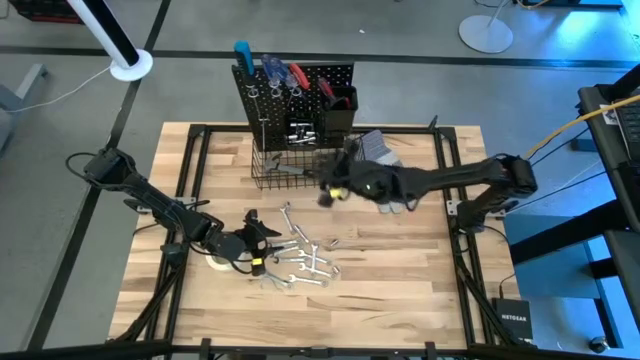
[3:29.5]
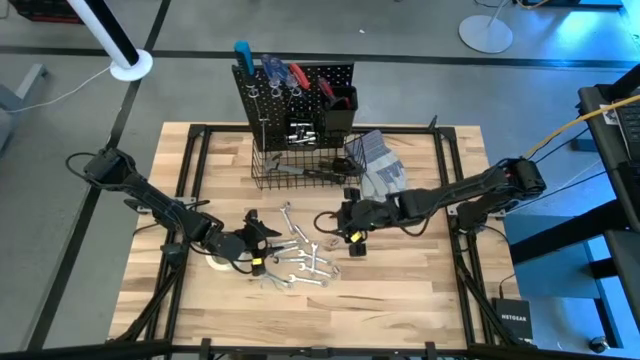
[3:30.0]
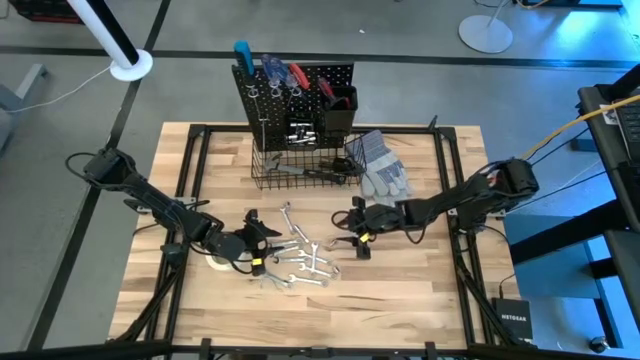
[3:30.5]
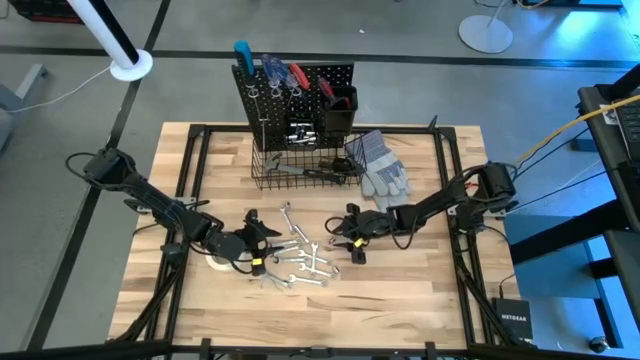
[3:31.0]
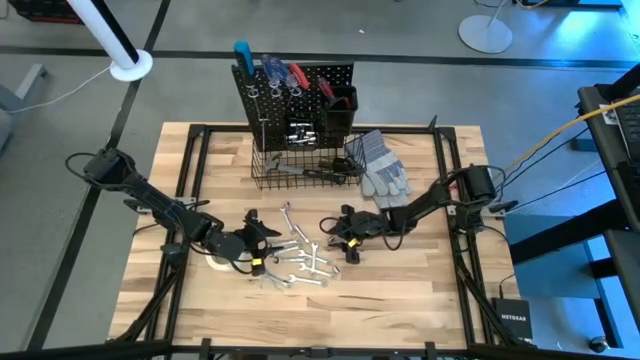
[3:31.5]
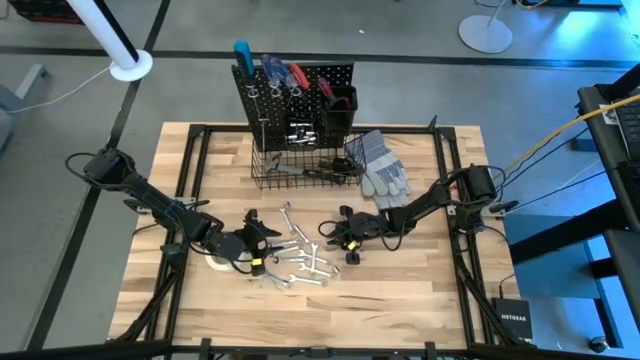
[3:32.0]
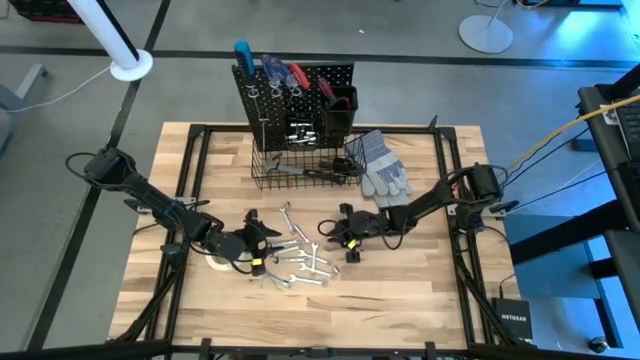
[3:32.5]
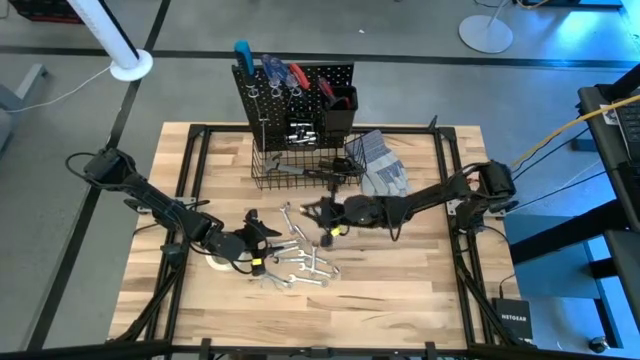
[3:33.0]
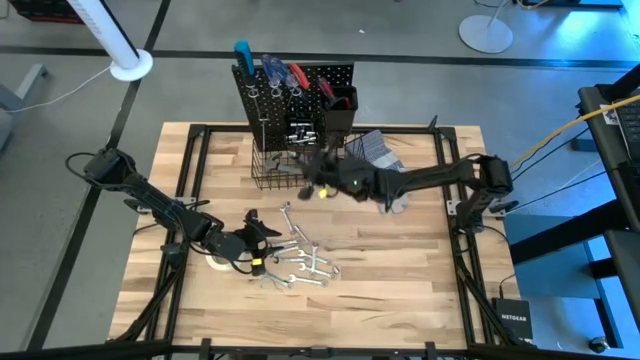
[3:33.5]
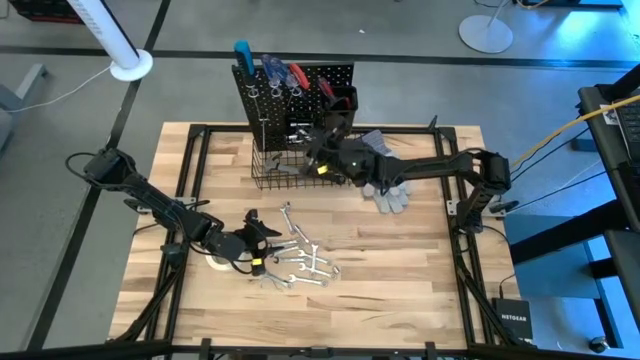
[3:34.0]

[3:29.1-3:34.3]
Task: Hang tools onto peg board
Put the socket adapter into the left black bin on the peg board

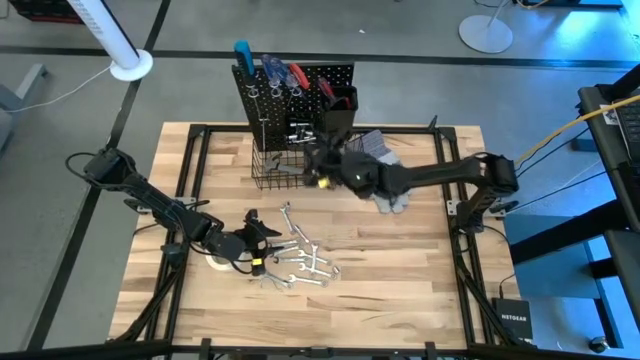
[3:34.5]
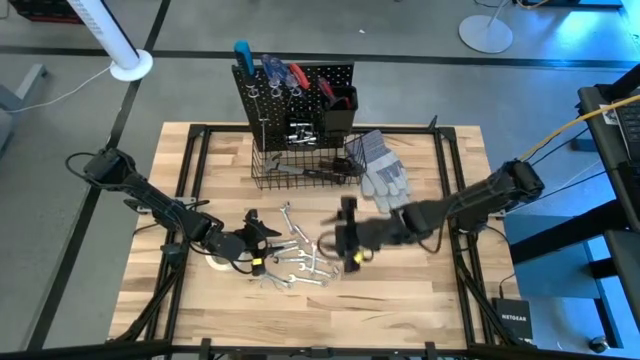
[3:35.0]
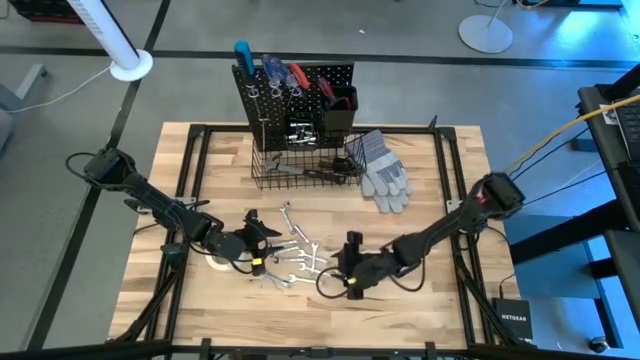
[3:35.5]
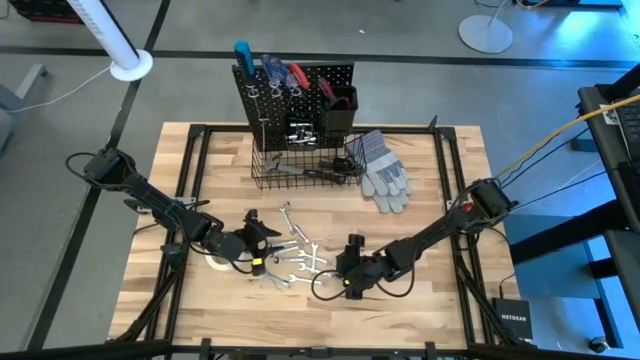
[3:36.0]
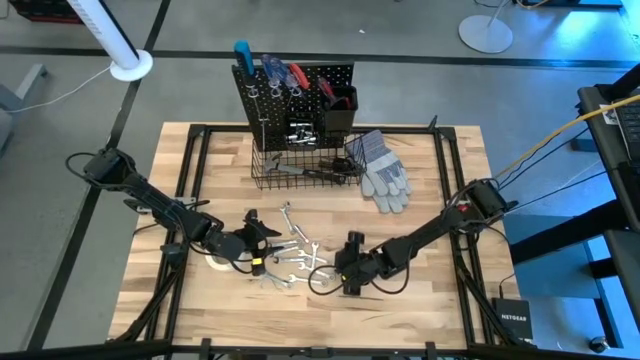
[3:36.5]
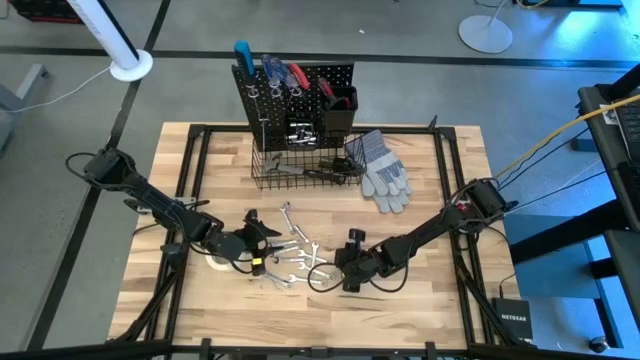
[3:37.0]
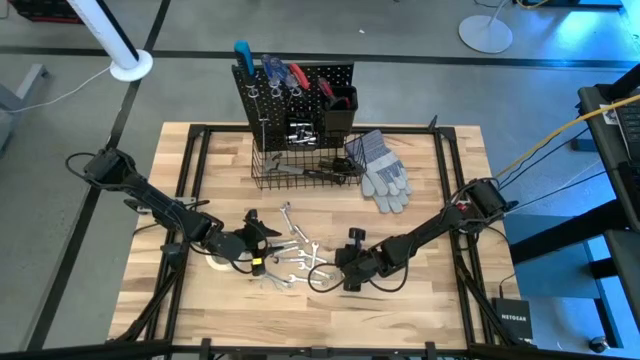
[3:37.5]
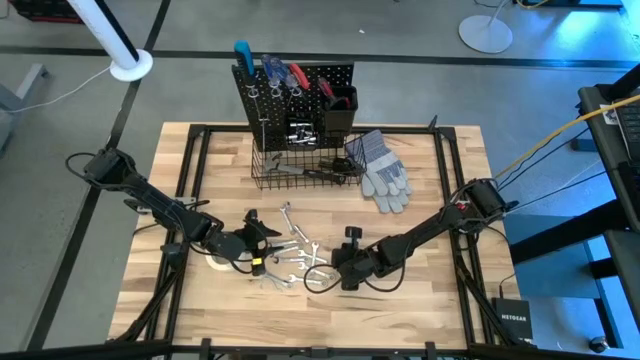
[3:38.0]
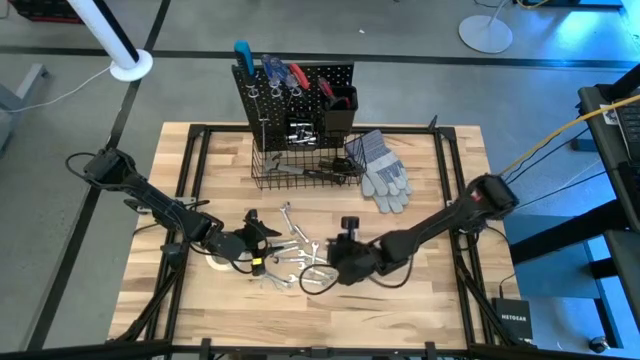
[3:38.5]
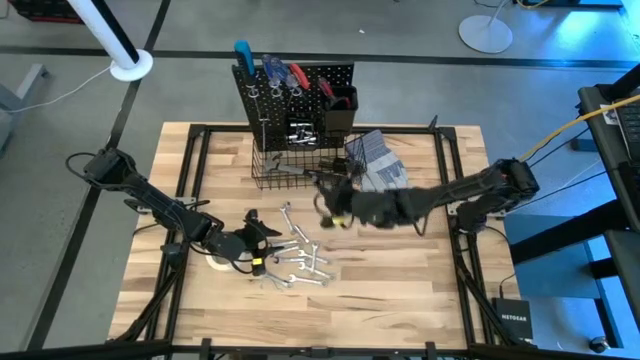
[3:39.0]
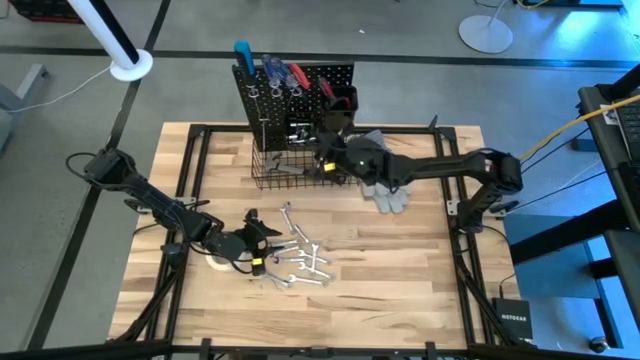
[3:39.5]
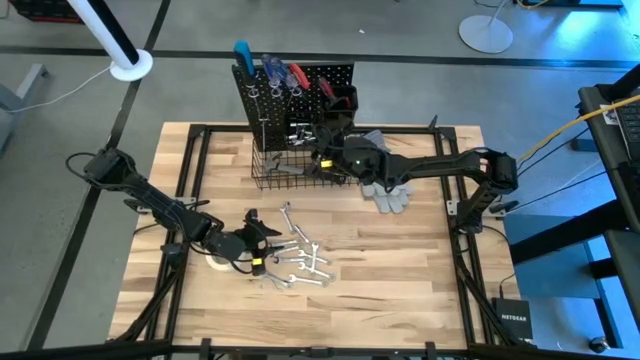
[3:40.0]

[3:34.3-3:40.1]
Put the socket into the left black bin on the peg board

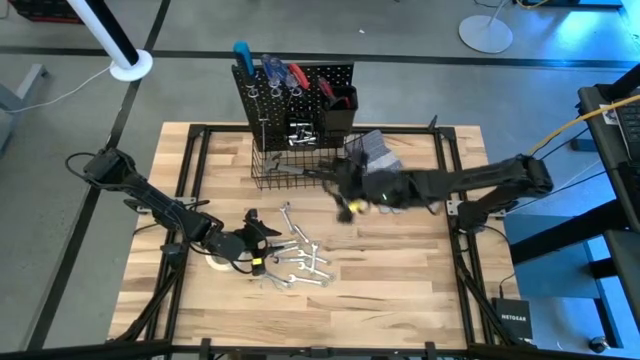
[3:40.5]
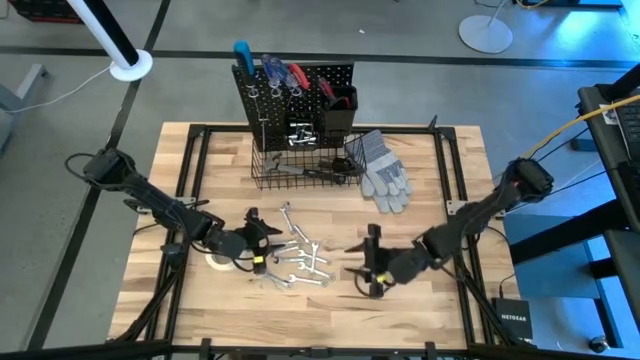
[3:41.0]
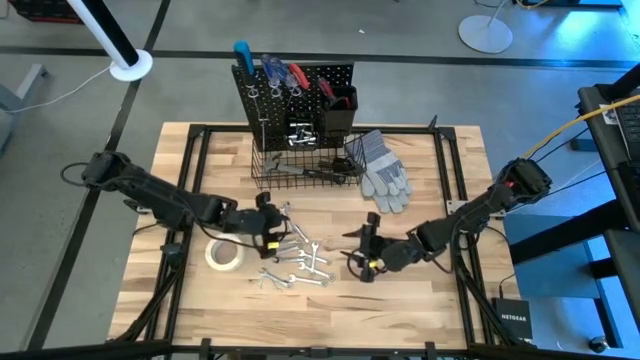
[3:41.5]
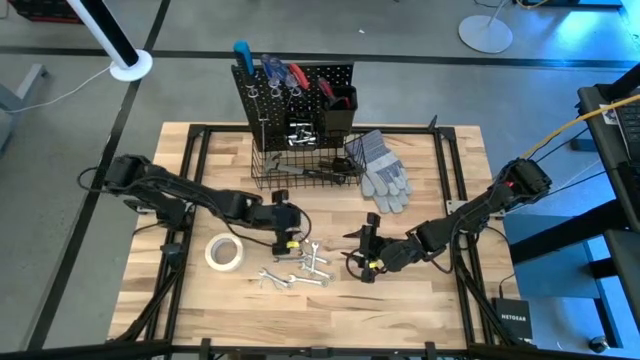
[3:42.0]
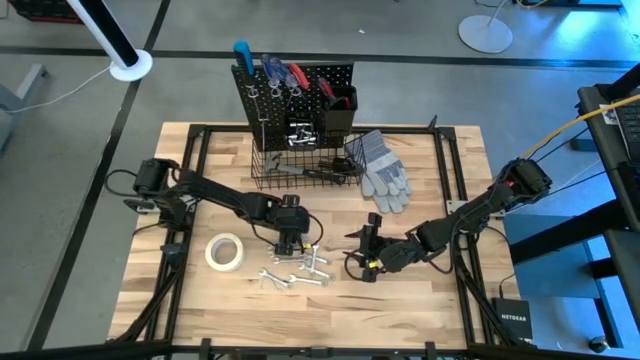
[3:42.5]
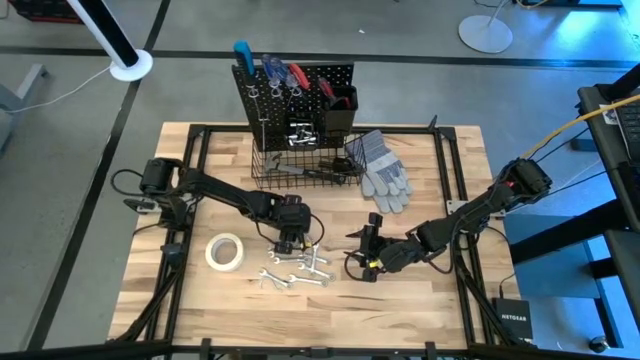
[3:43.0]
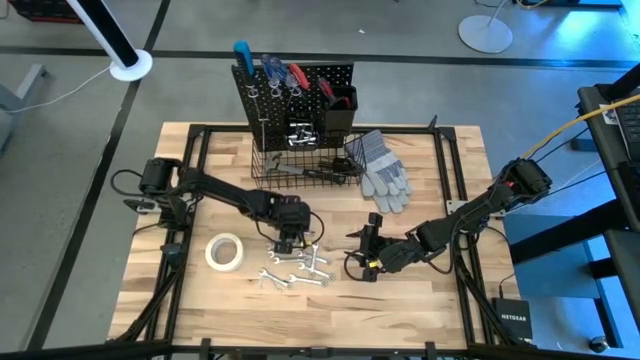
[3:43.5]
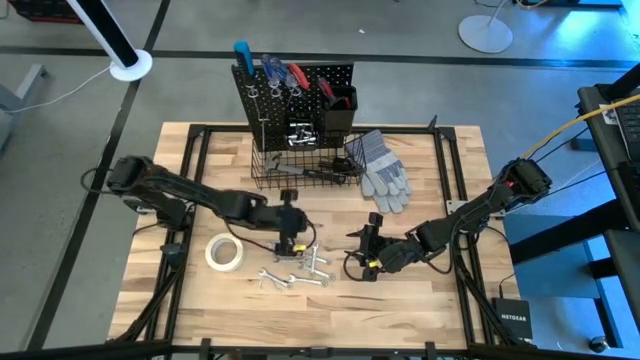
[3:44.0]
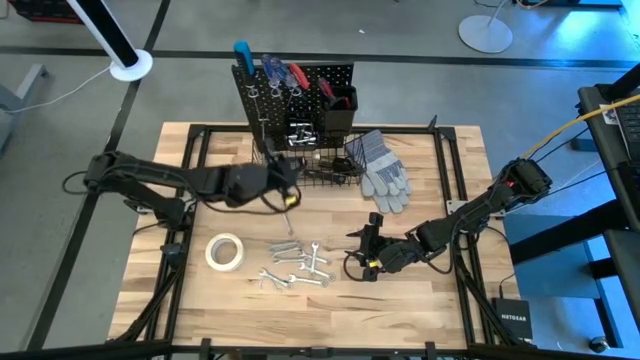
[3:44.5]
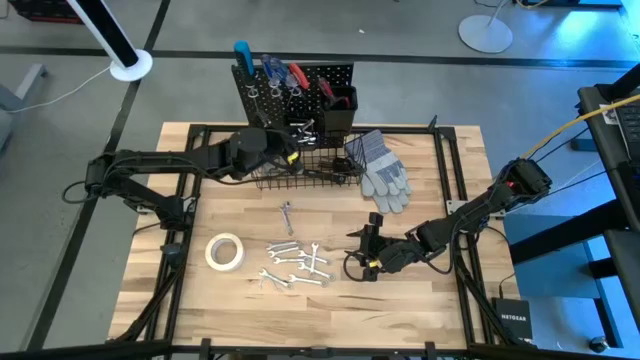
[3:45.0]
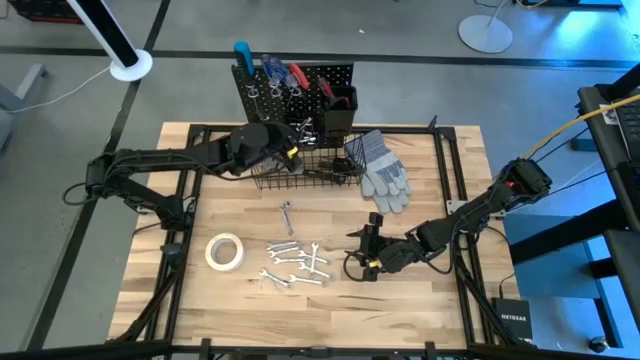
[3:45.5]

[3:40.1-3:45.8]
Put the extension bar into the left black bin on the peg board

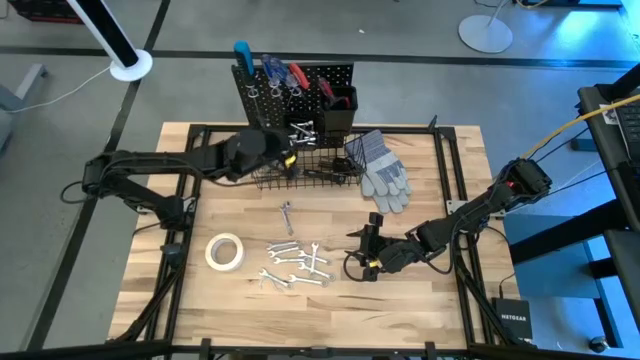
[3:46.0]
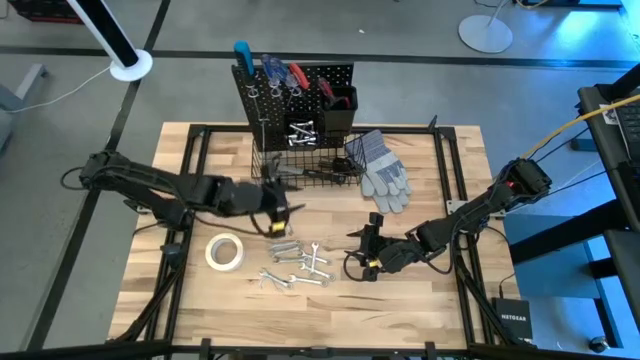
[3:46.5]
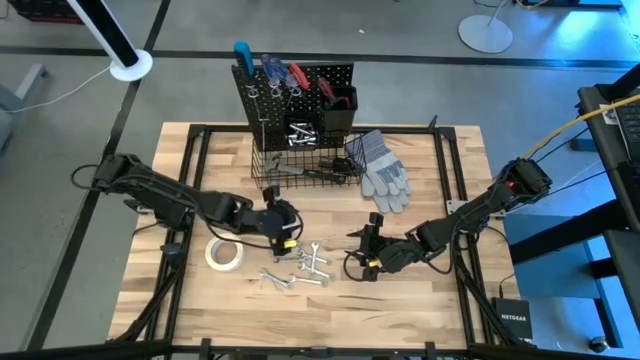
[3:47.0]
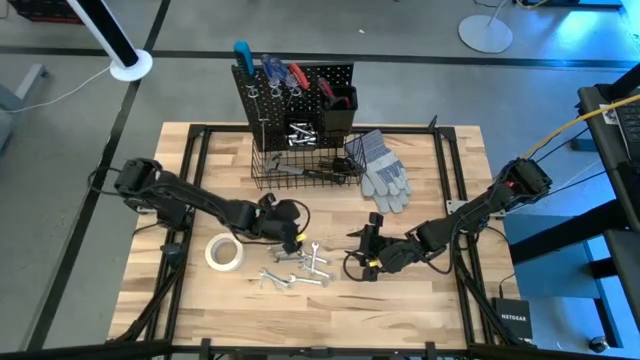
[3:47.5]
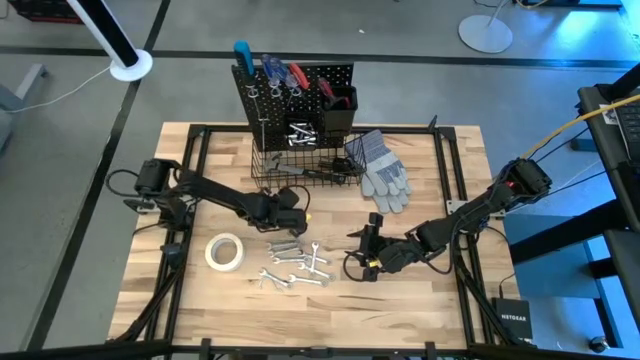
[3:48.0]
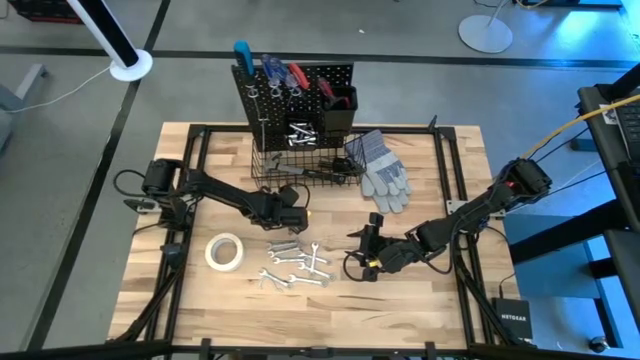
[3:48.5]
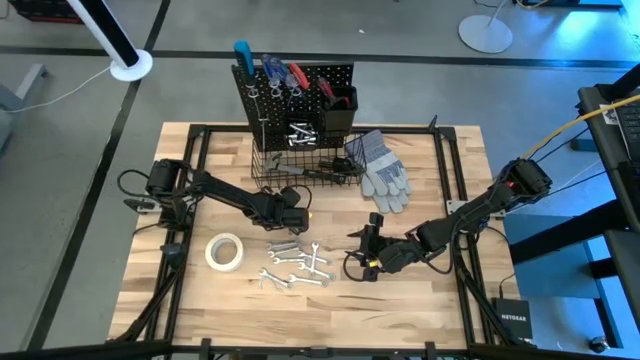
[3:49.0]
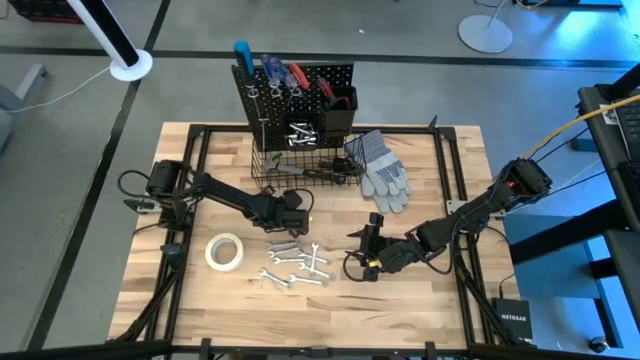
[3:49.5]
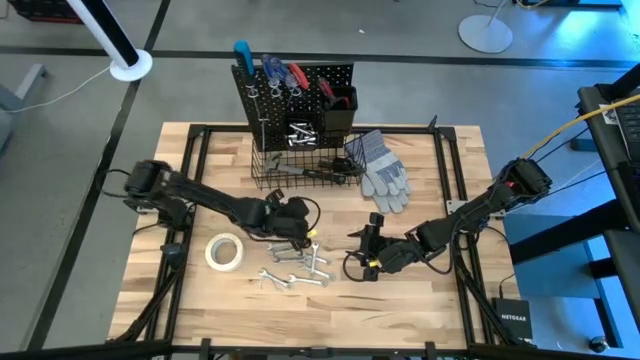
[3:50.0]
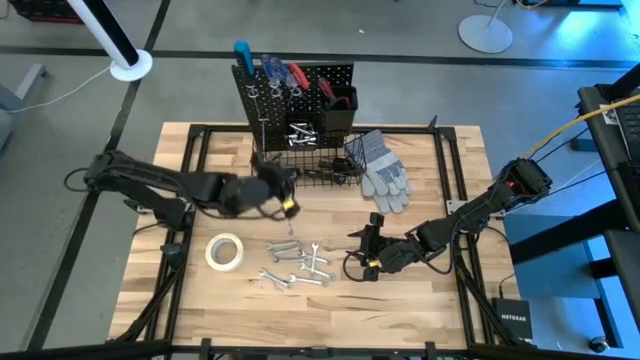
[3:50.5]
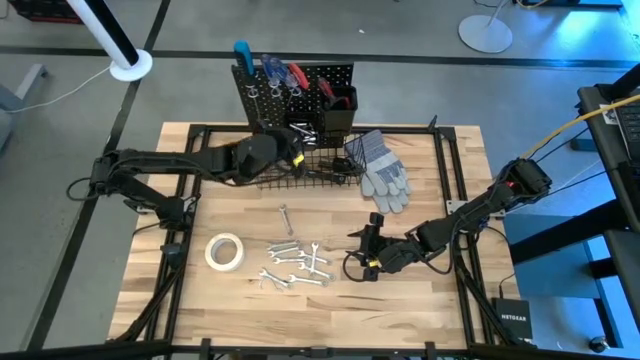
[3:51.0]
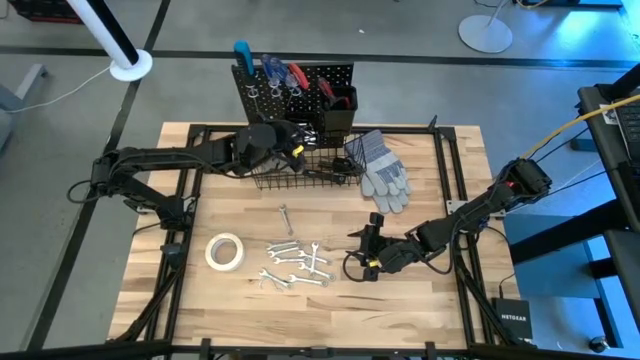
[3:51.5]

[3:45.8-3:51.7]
Put the socket adapter into the left black bin on the peg board
